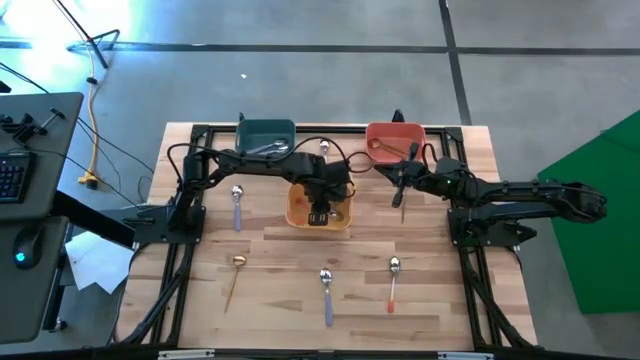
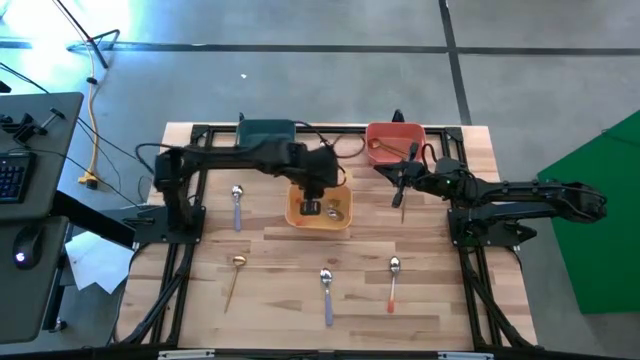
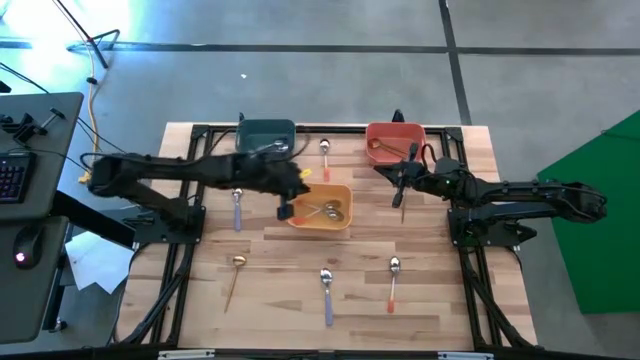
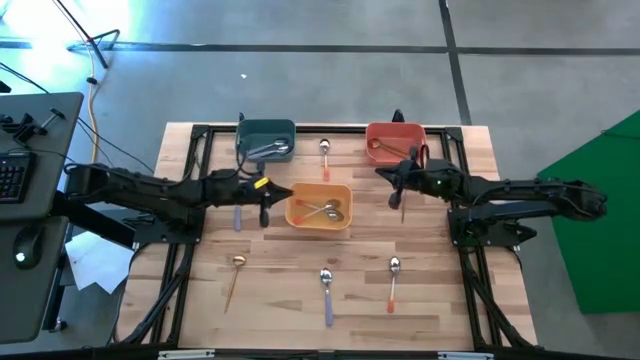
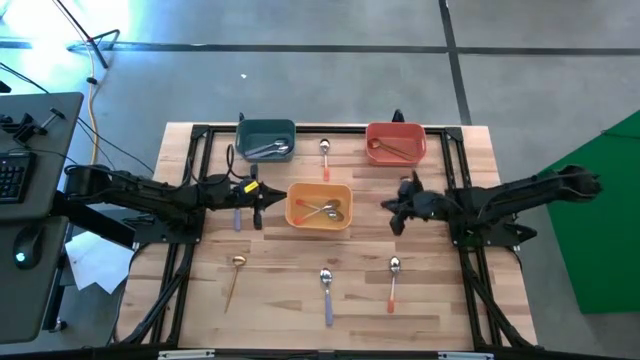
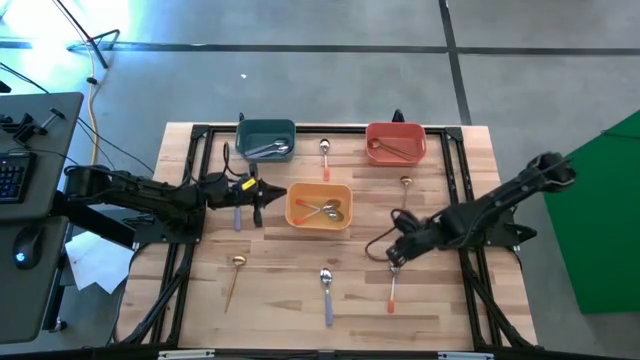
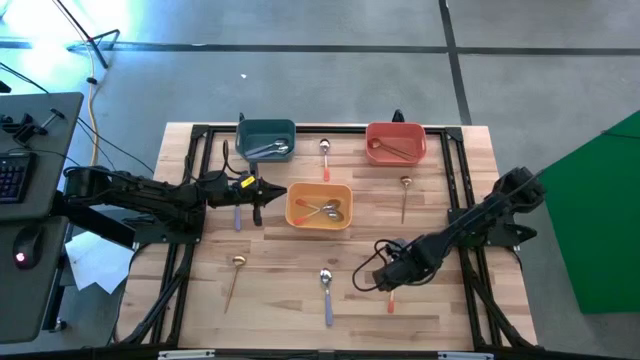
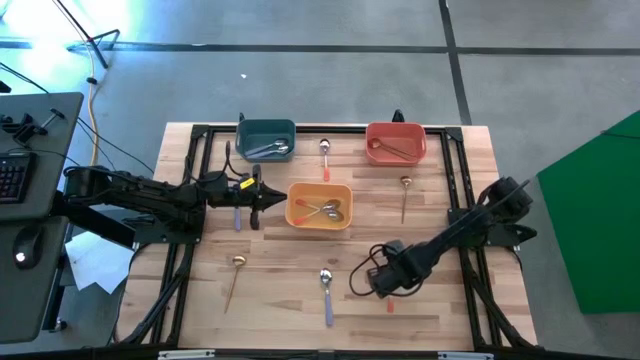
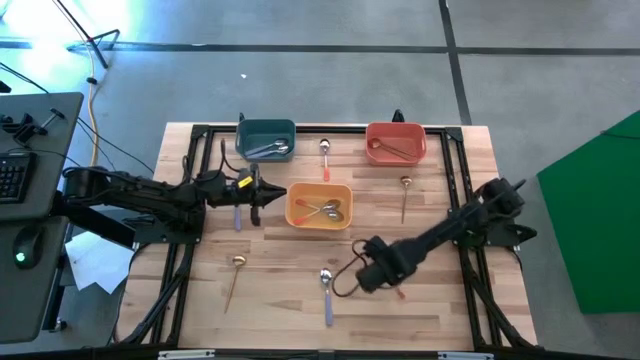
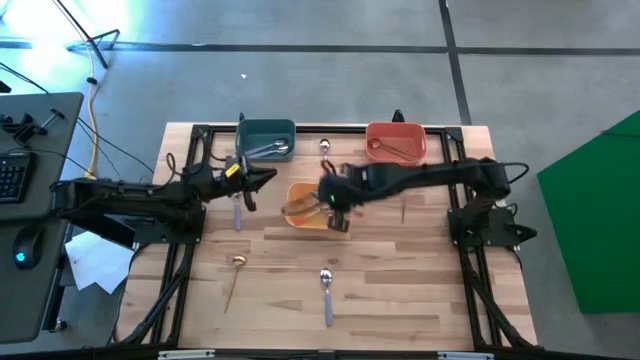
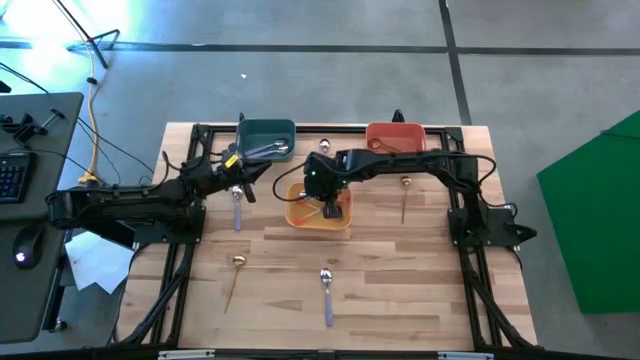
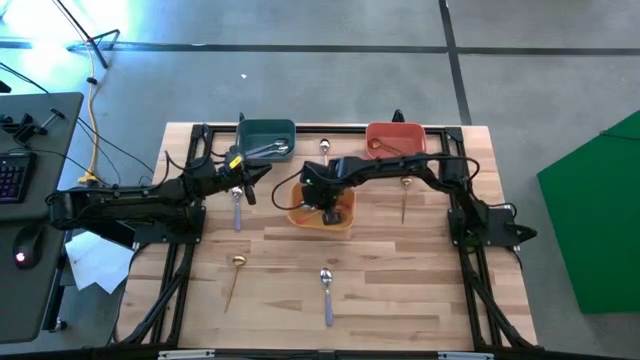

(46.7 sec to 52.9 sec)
Task: Sort silverware by color (type)
Put the orange spoon into the yellow bin

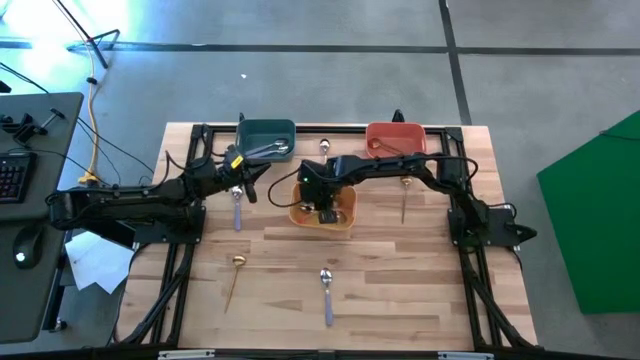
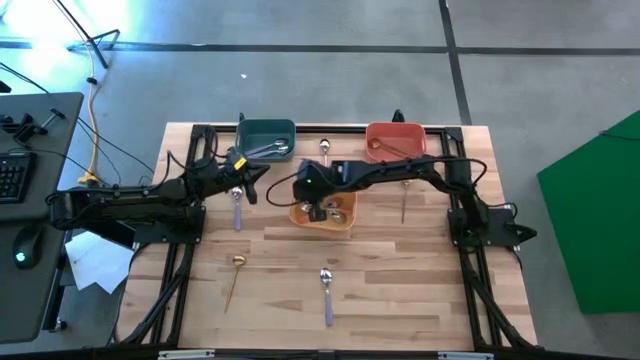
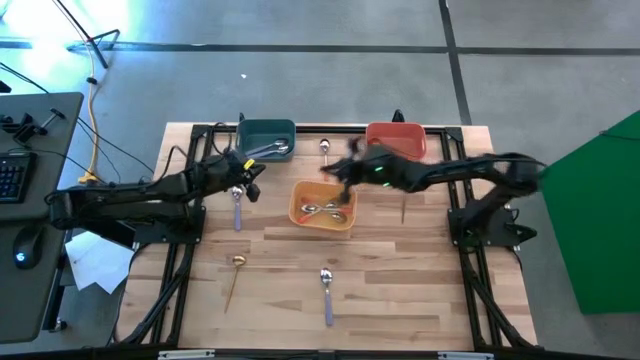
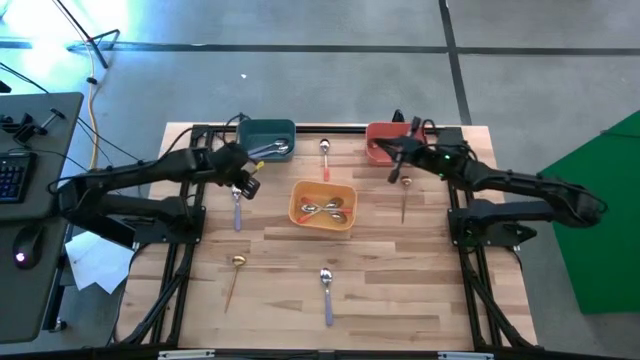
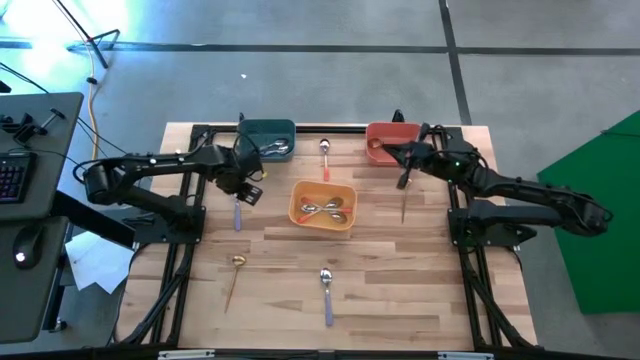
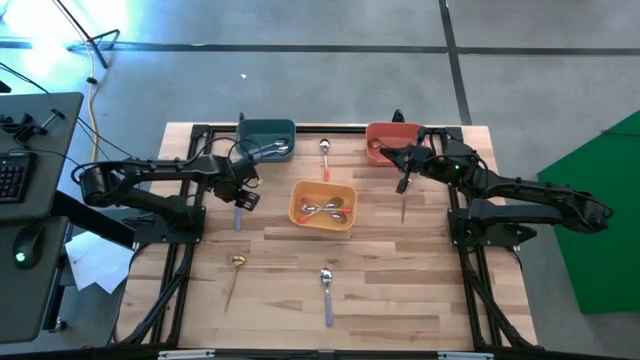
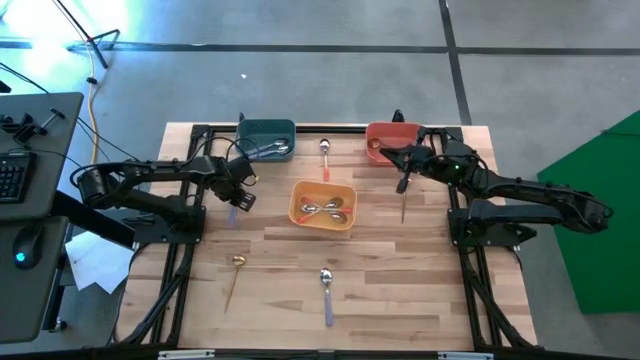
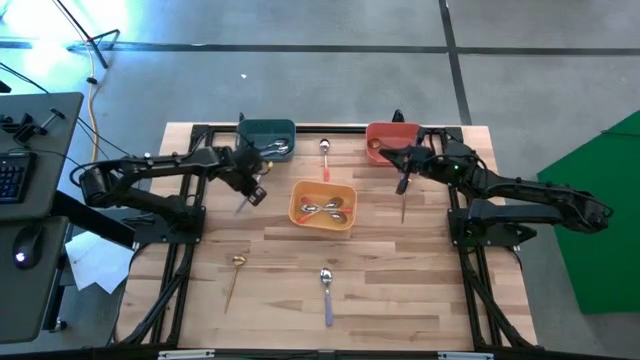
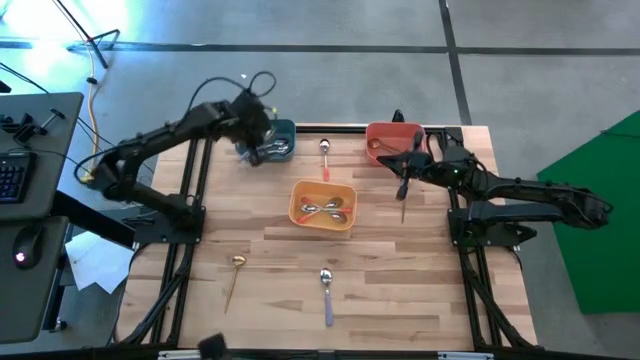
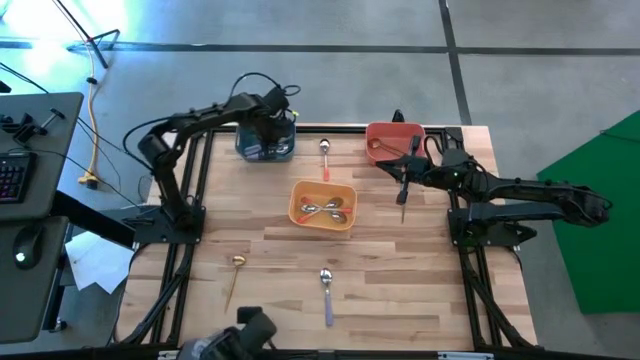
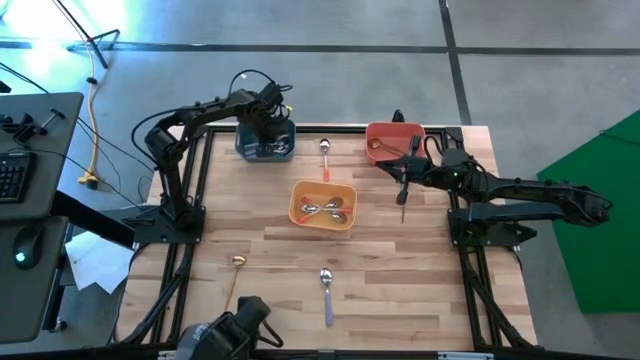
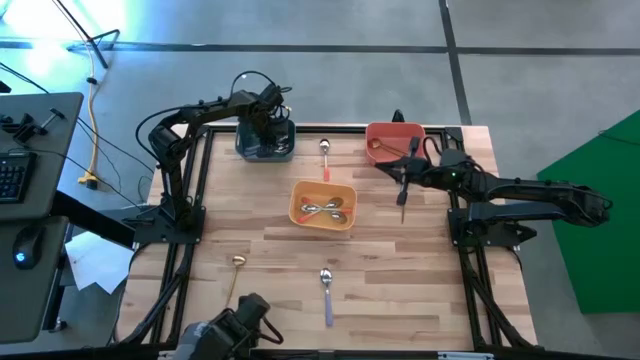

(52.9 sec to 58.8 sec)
Put the purple spoon into the blue bin

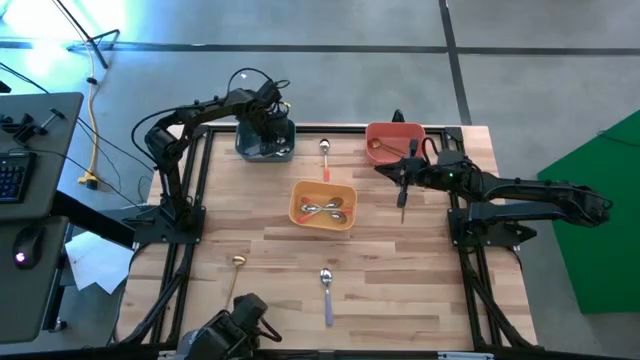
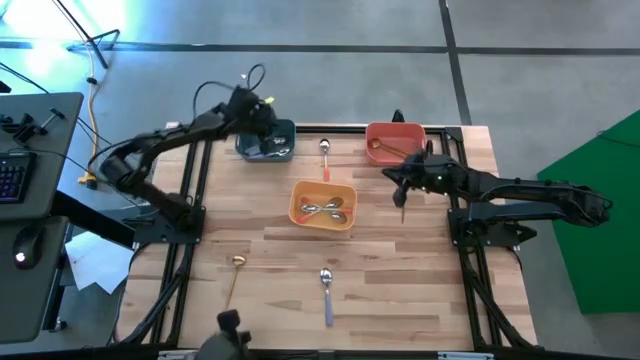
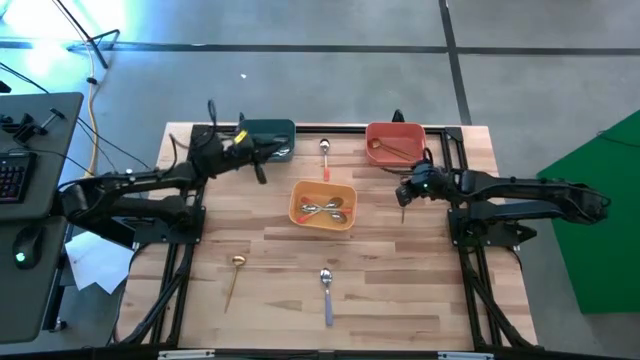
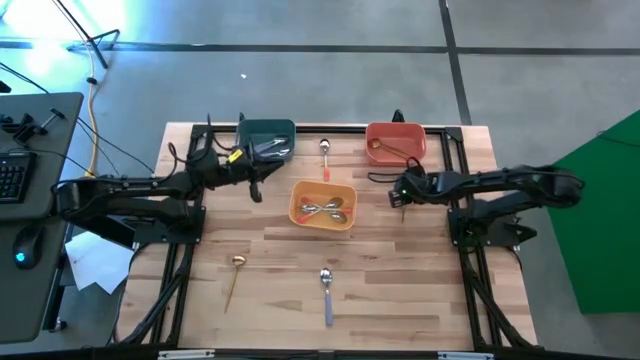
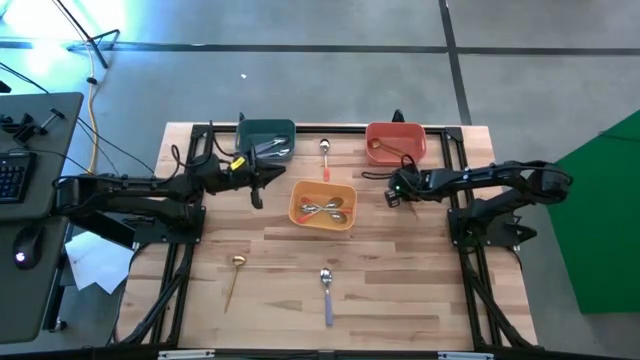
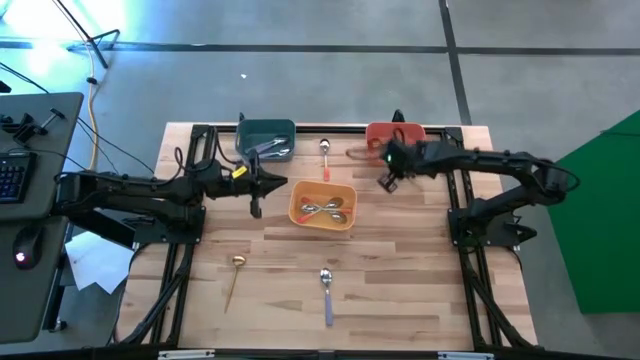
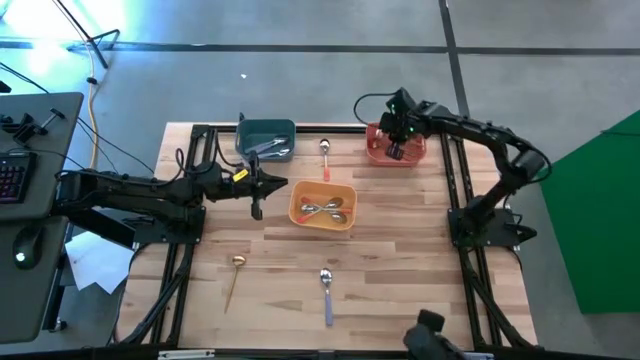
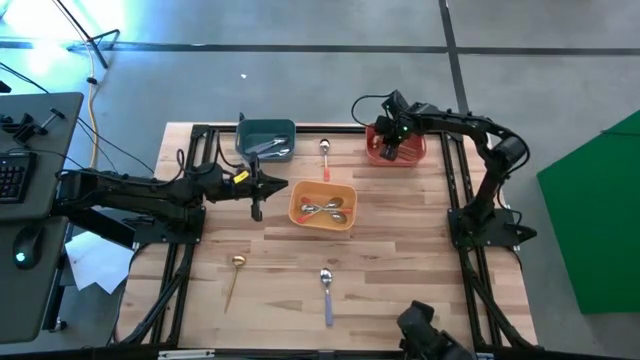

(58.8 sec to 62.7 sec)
Put the gold spoon into the orange bin

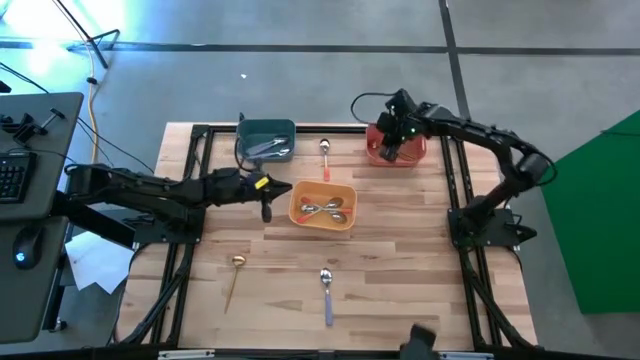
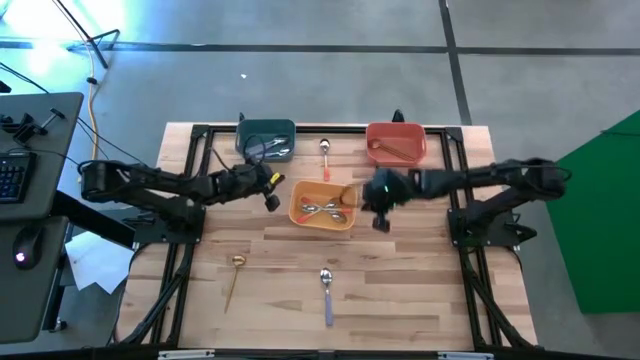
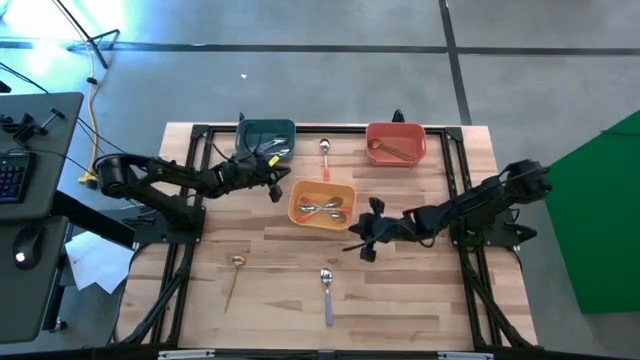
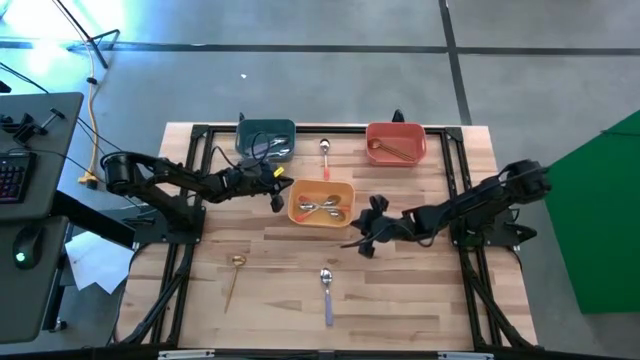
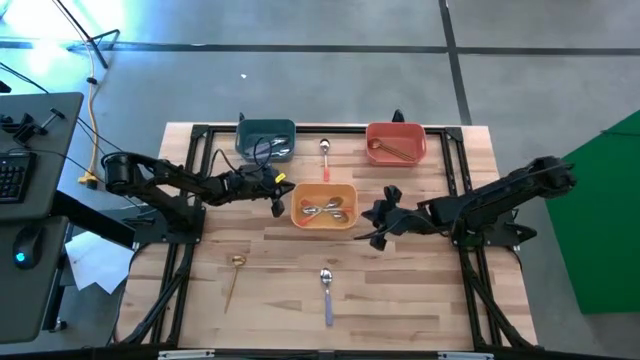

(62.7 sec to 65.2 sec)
Adjust the yellow bin

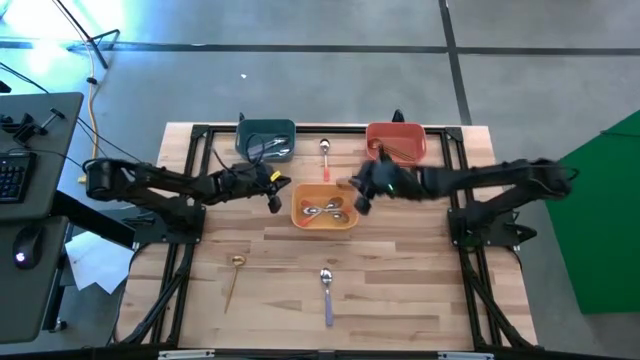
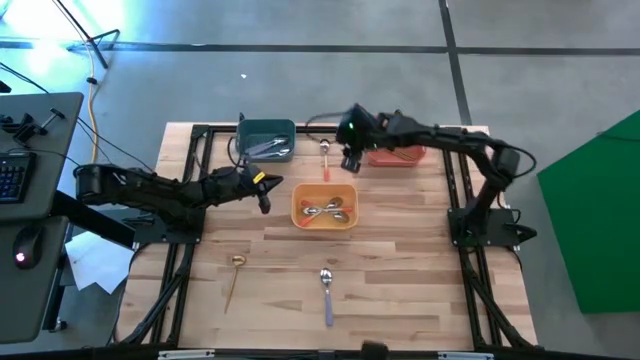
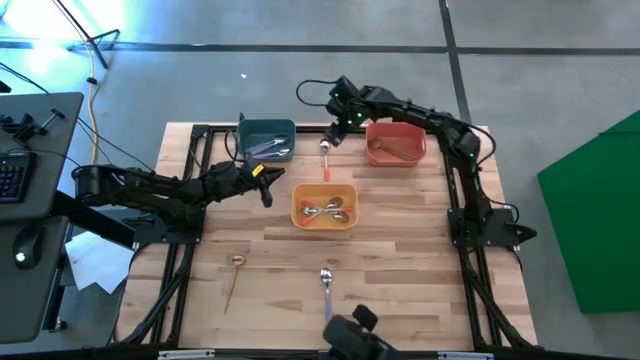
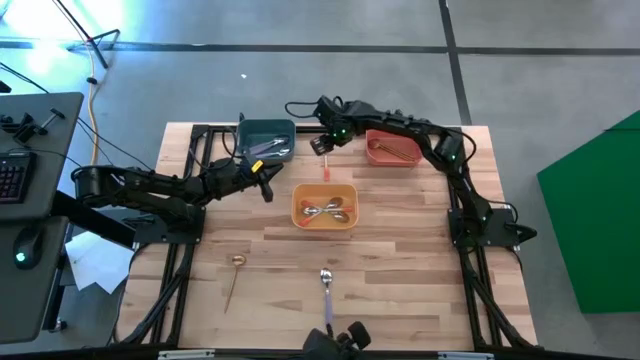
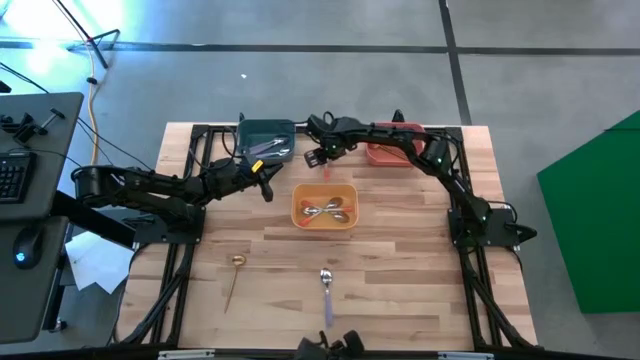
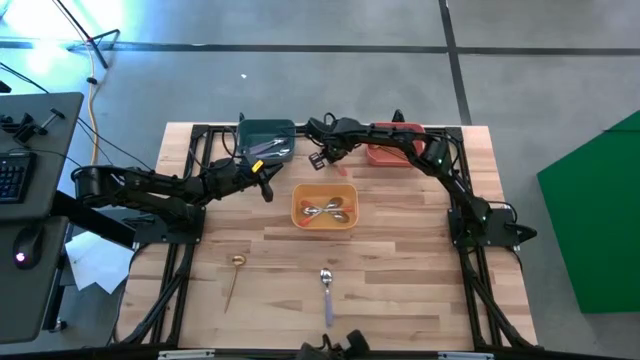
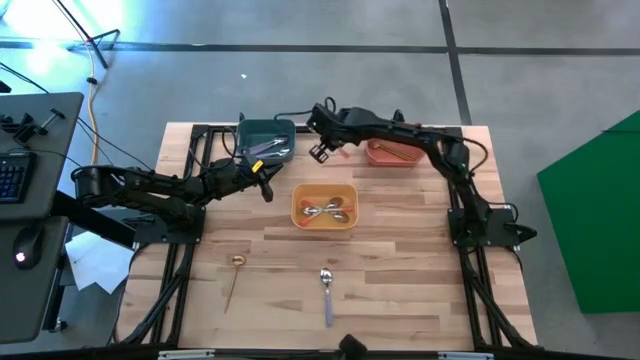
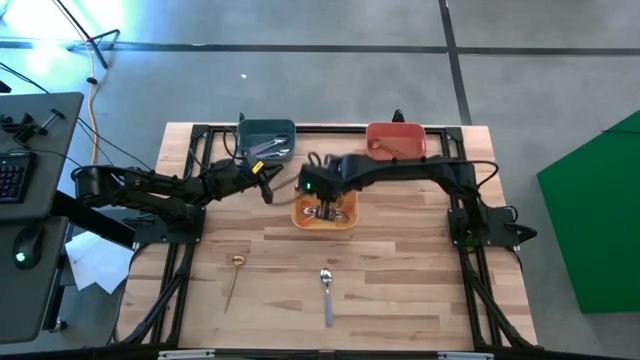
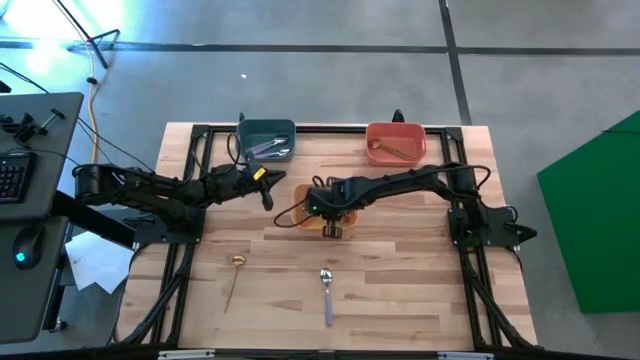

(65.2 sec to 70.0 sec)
Put the orange spoon into the yellow bin
